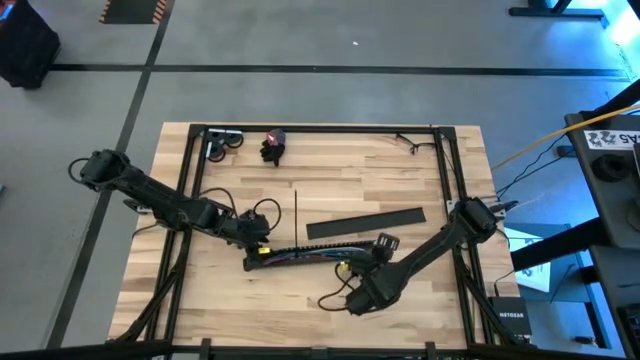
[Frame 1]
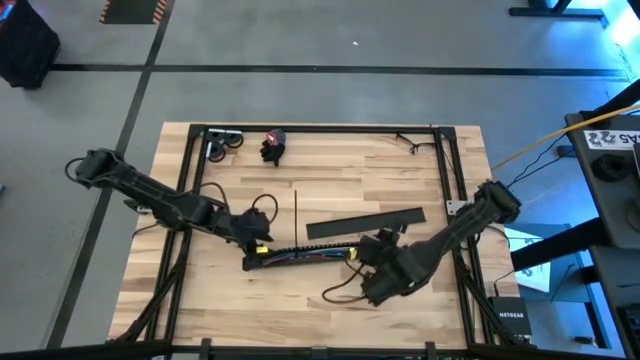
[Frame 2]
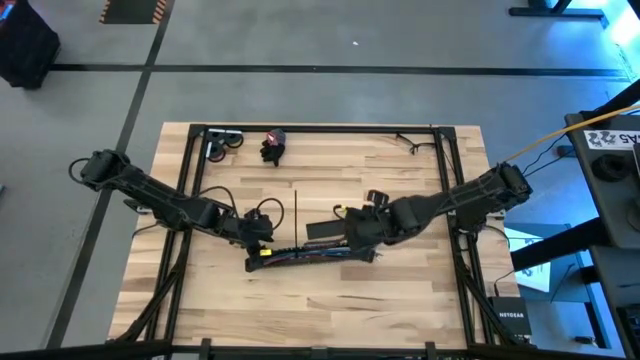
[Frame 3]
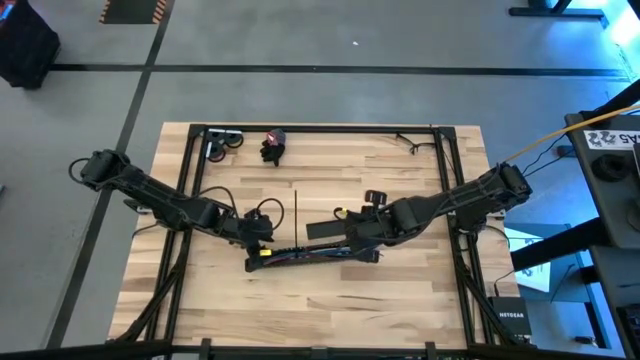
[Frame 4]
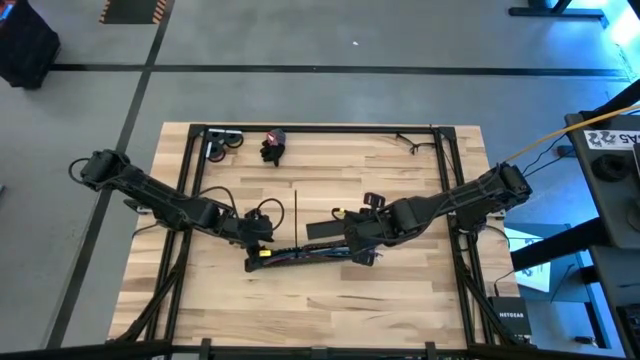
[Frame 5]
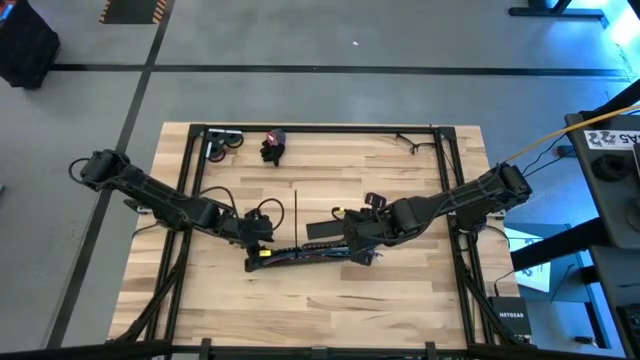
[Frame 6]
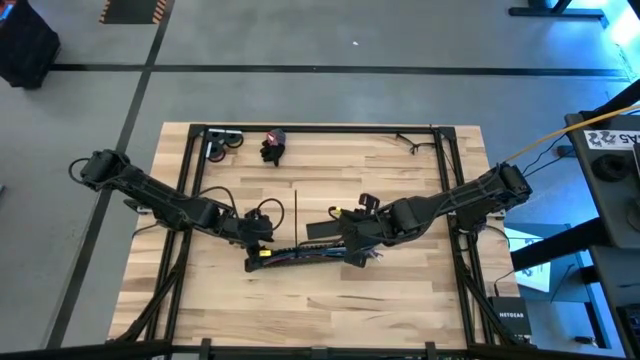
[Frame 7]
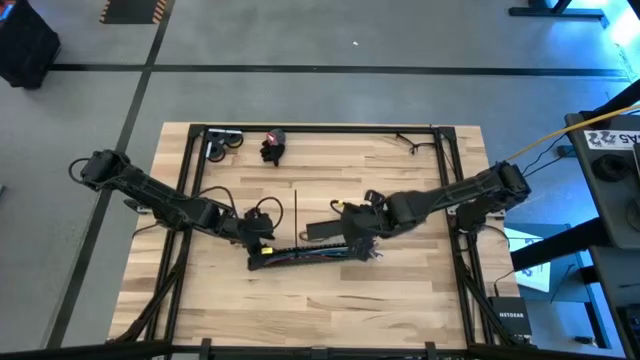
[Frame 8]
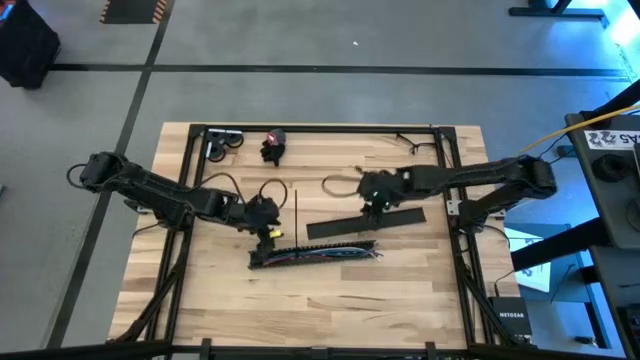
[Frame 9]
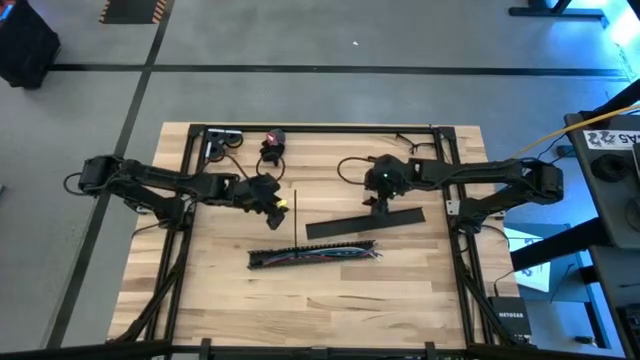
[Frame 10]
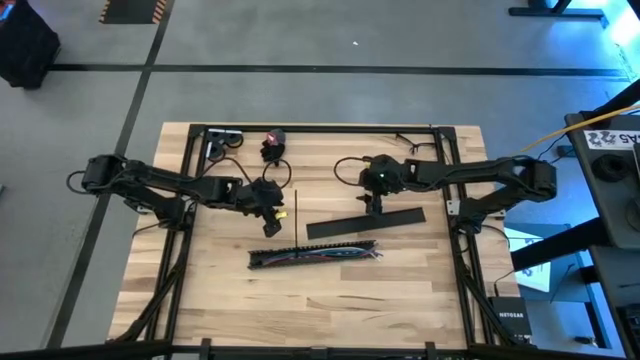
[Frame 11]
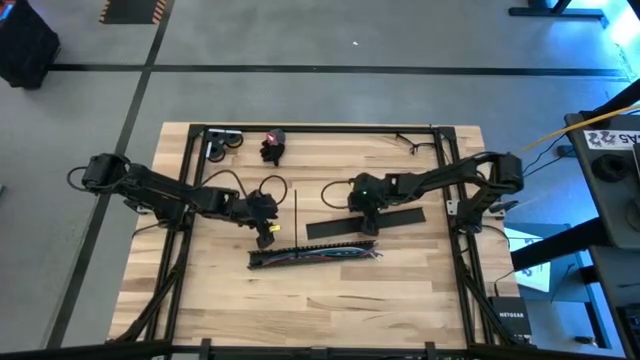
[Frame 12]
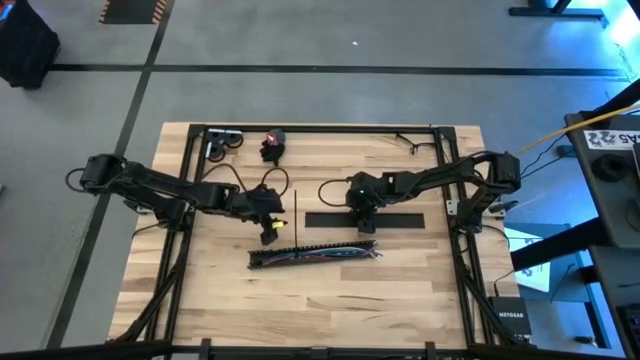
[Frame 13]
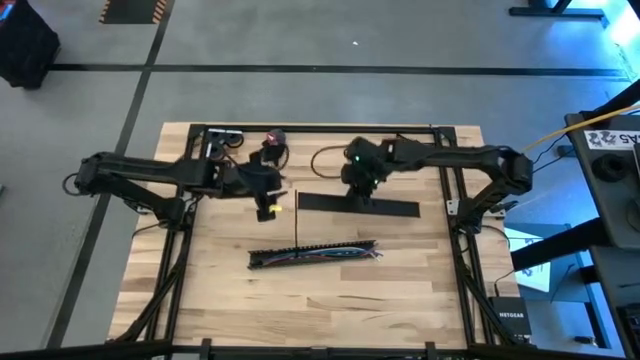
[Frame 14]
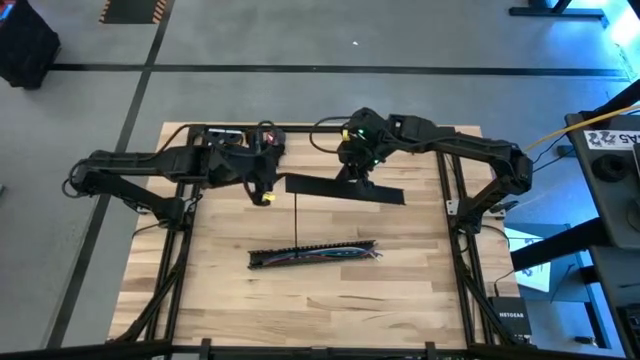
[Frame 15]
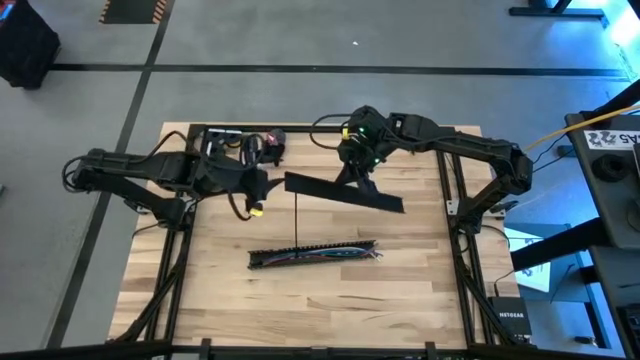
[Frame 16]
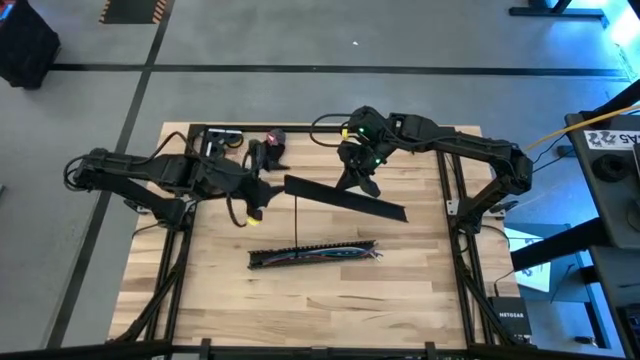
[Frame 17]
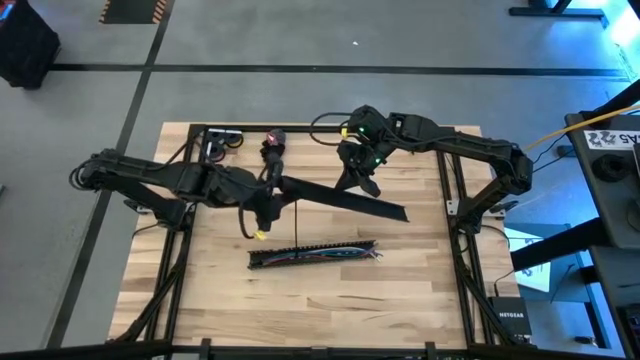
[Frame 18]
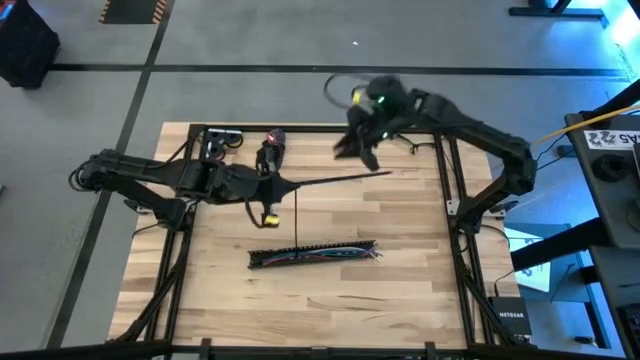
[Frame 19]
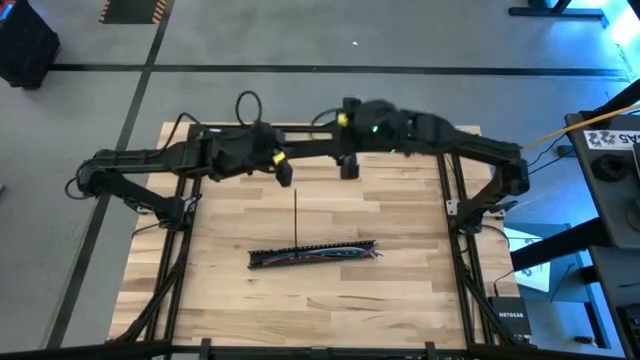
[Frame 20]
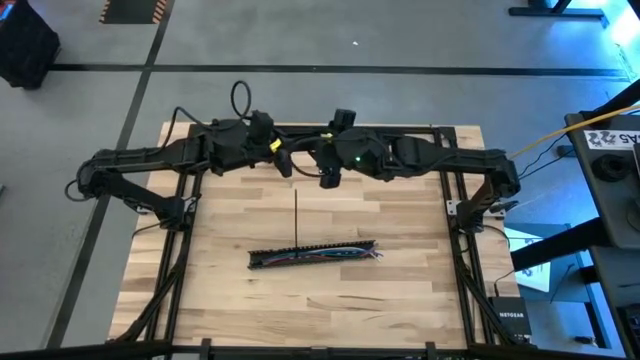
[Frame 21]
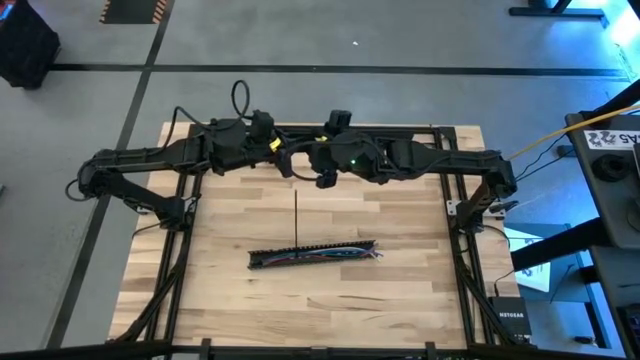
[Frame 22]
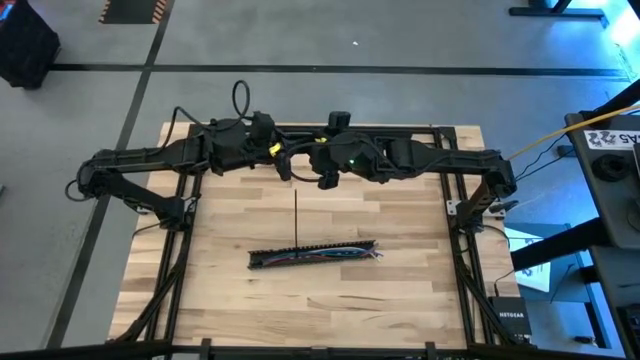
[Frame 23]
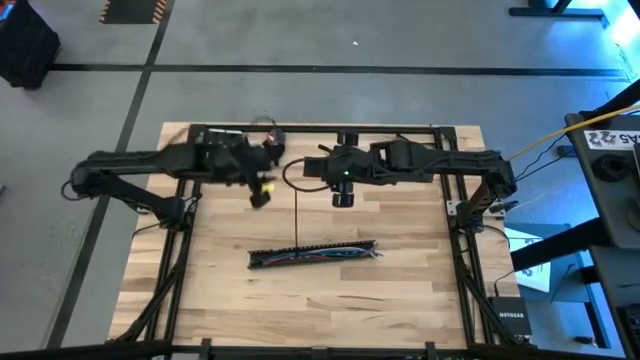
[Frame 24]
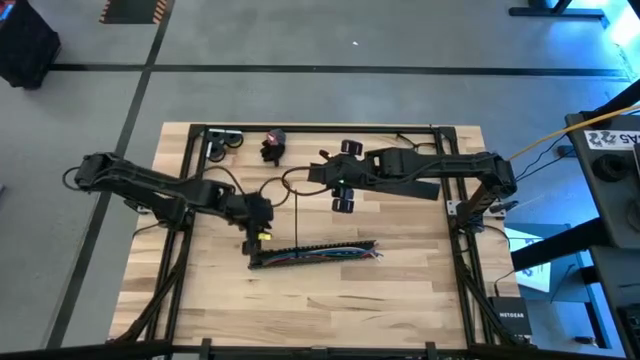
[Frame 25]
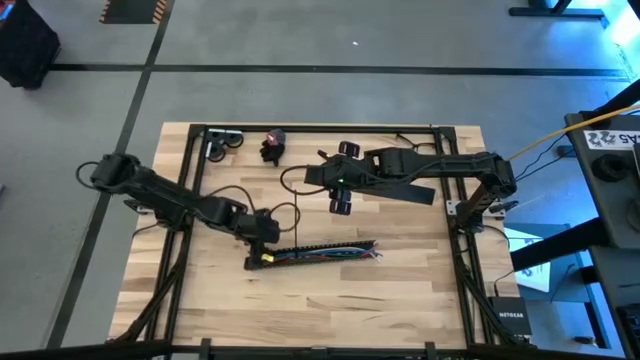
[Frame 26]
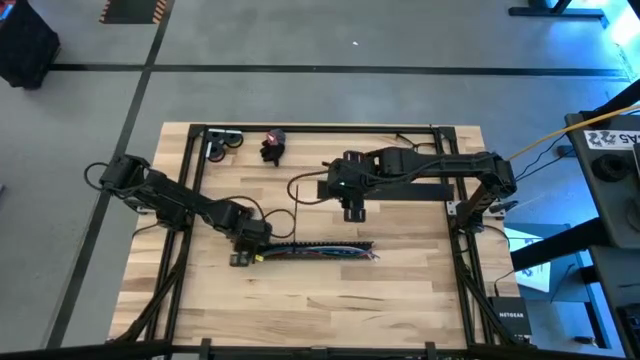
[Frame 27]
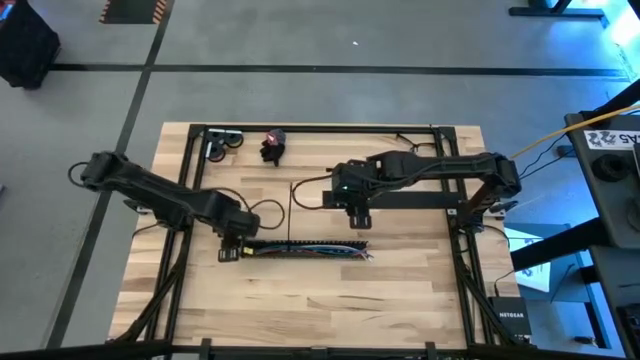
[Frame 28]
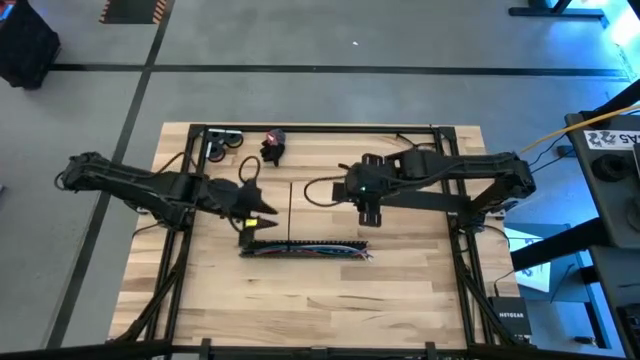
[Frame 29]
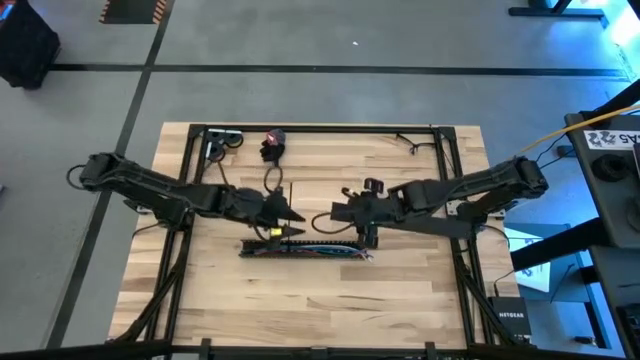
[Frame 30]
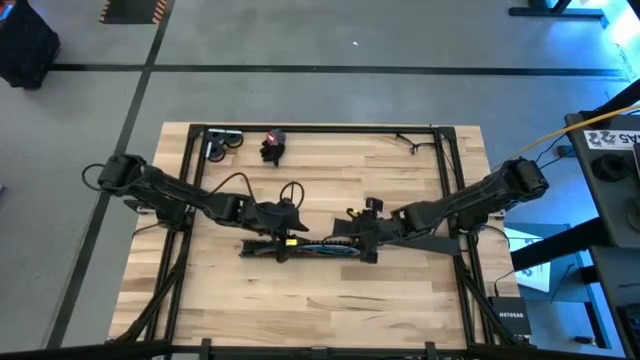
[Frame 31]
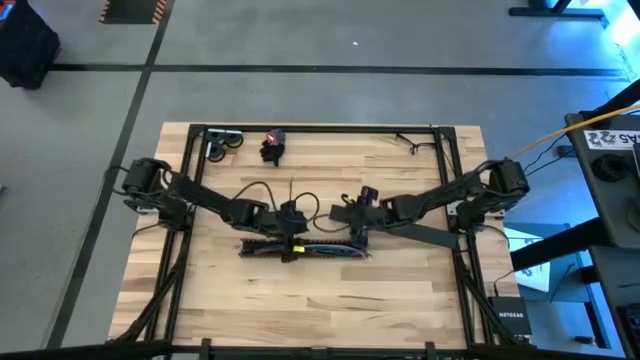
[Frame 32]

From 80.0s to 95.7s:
Task: Ziptie cables
Close the black cable duct

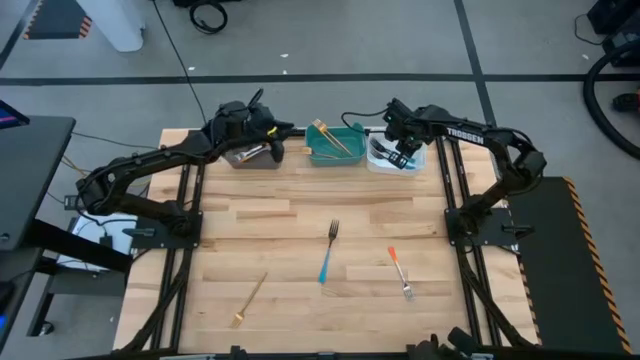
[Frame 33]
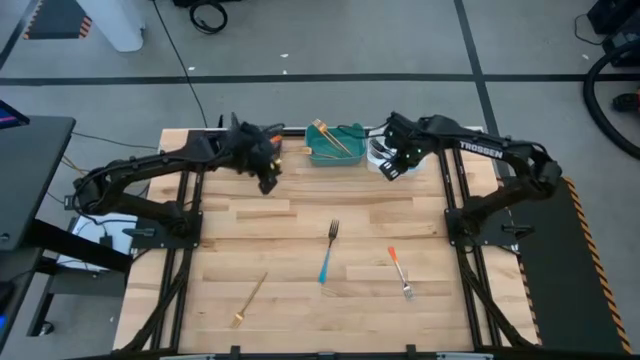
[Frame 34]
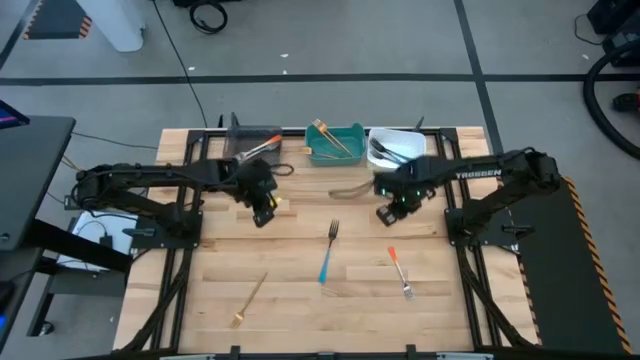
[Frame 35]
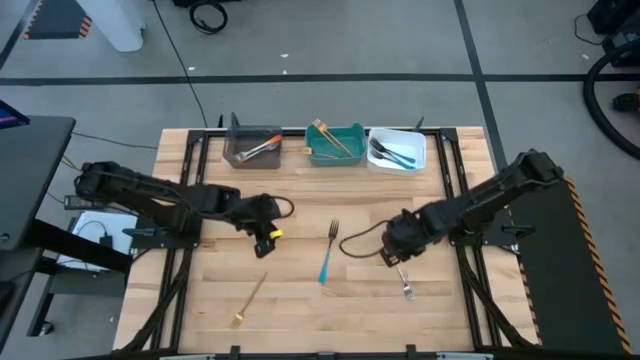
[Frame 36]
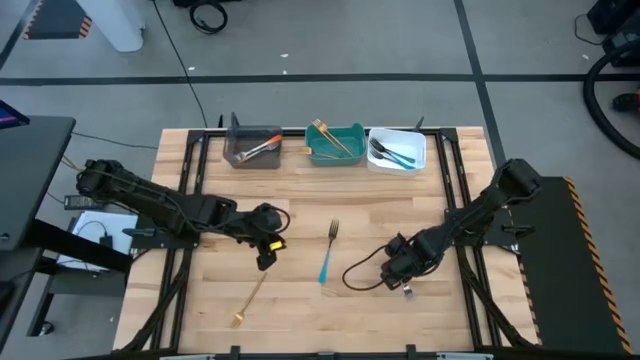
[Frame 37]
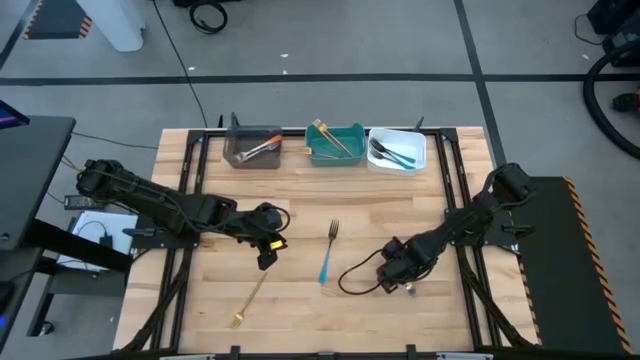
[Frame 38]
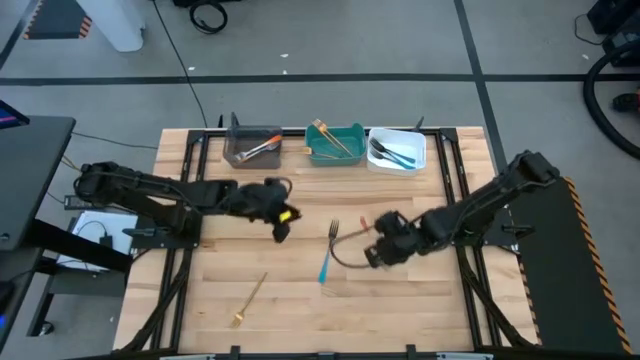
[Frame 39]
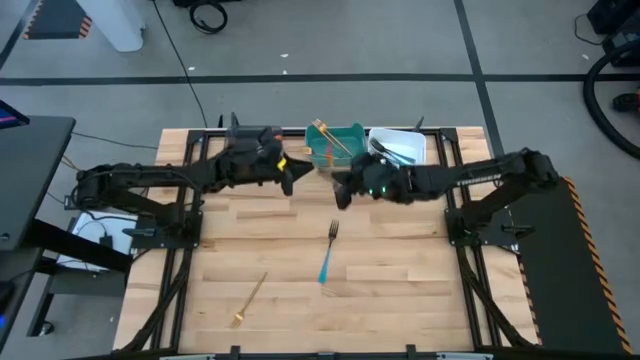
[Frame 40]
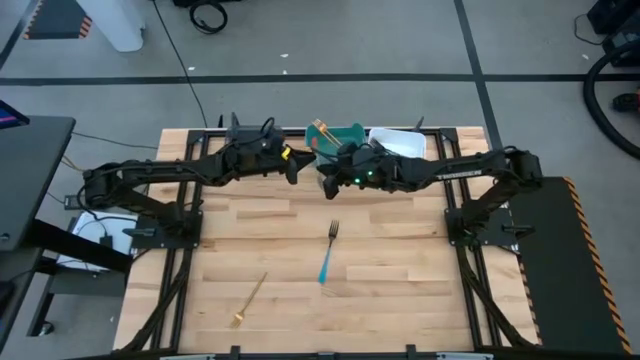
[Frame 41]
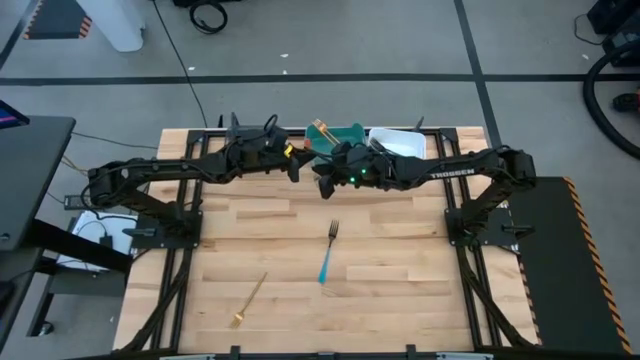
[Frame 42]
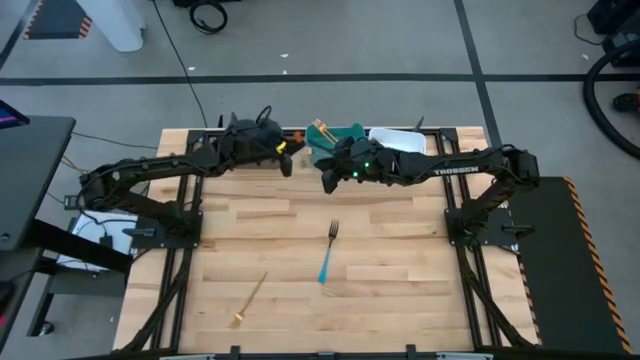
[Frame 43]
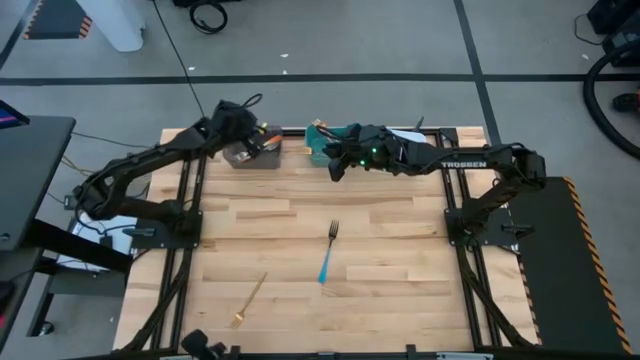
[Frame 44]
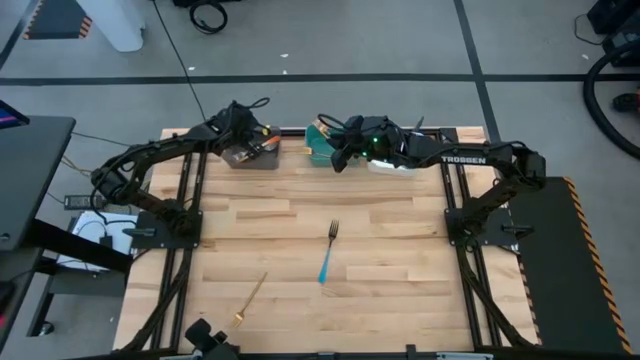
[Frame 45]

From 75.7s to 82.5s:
Task: Sort silverware by color (type)
Put the orange fork into the black transparent bin
